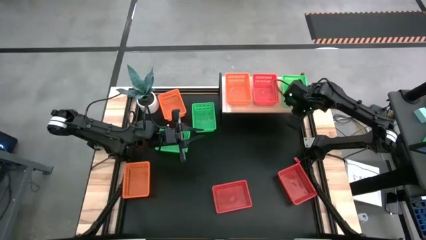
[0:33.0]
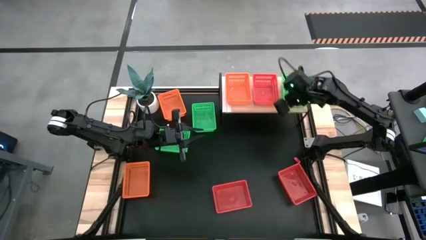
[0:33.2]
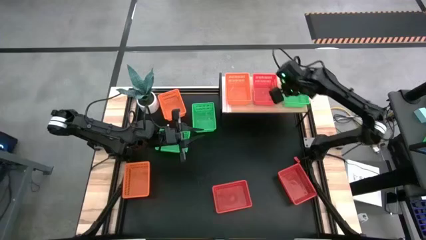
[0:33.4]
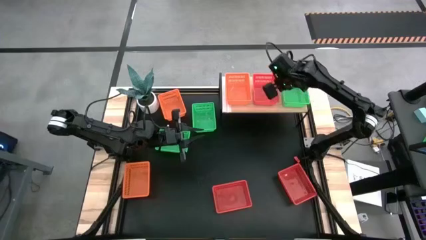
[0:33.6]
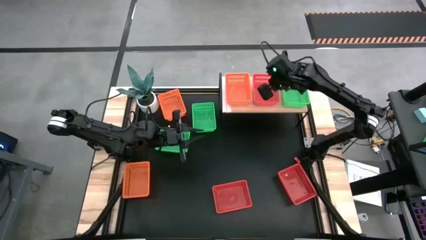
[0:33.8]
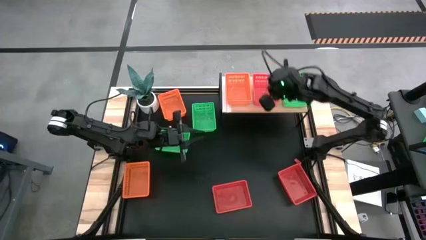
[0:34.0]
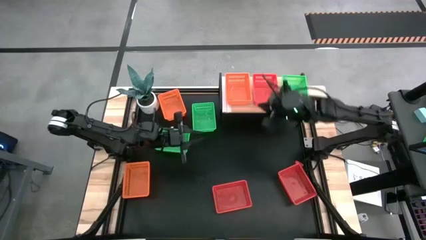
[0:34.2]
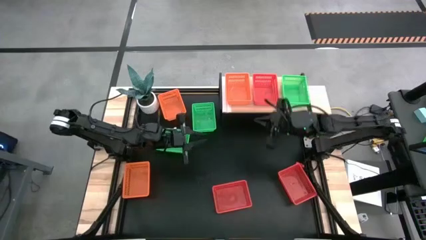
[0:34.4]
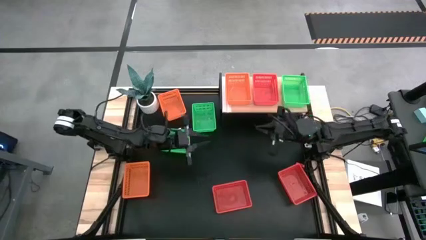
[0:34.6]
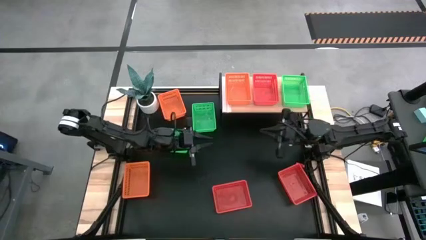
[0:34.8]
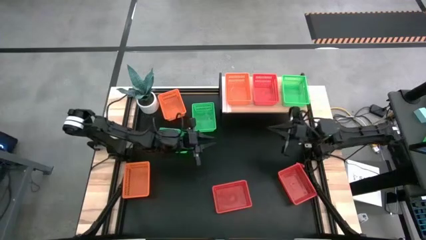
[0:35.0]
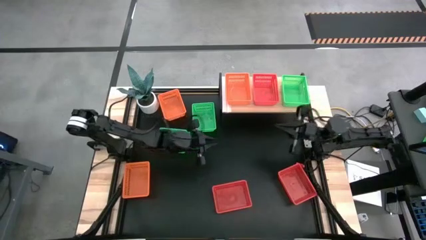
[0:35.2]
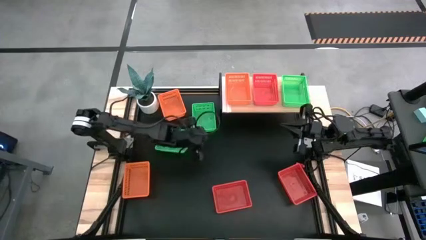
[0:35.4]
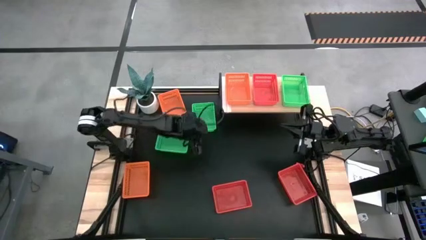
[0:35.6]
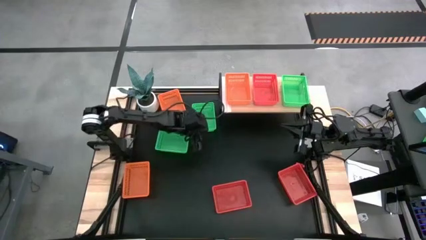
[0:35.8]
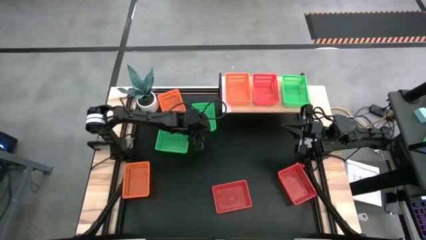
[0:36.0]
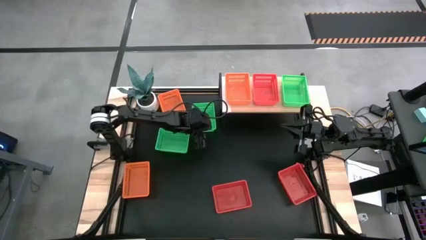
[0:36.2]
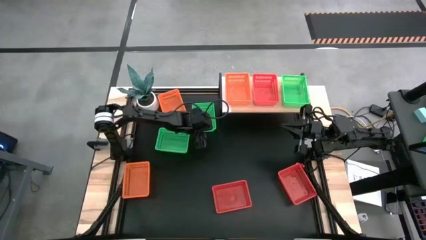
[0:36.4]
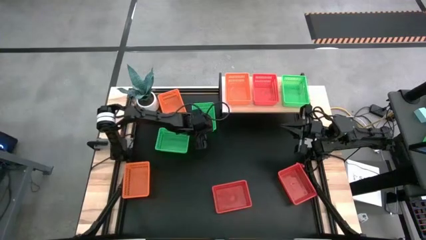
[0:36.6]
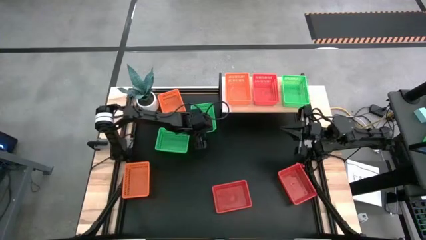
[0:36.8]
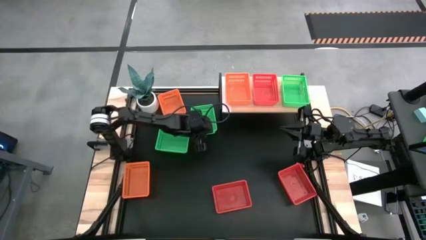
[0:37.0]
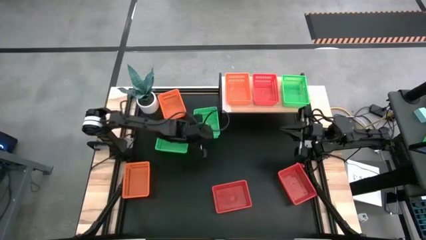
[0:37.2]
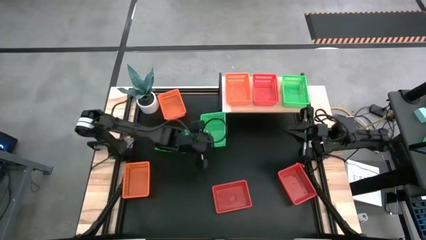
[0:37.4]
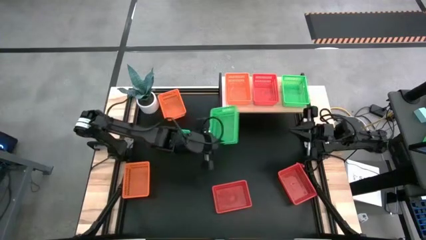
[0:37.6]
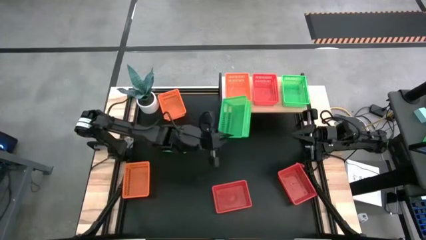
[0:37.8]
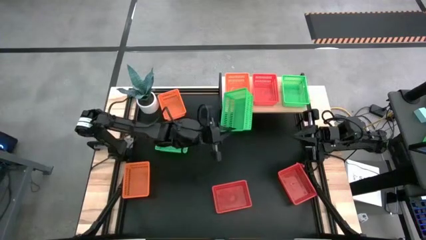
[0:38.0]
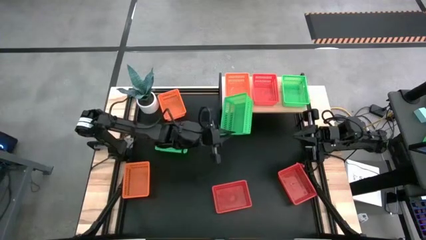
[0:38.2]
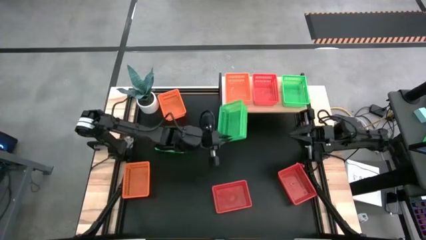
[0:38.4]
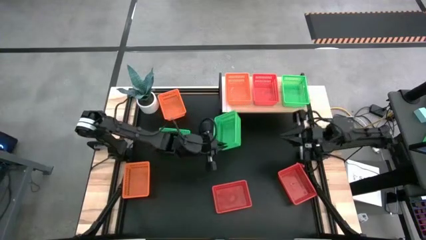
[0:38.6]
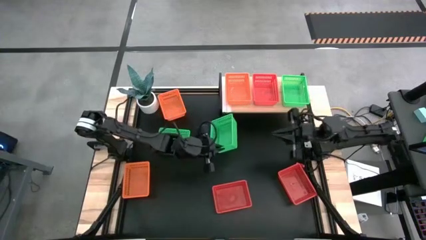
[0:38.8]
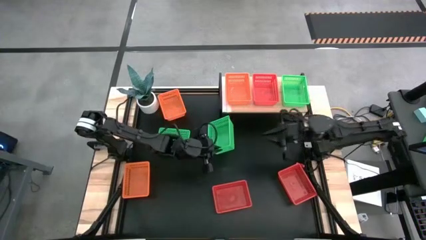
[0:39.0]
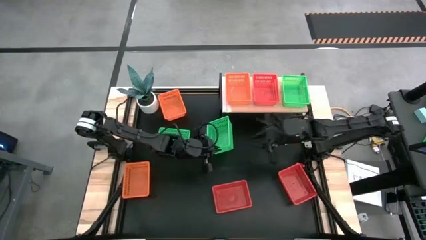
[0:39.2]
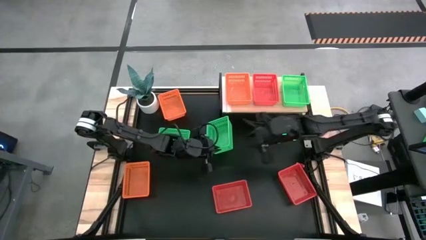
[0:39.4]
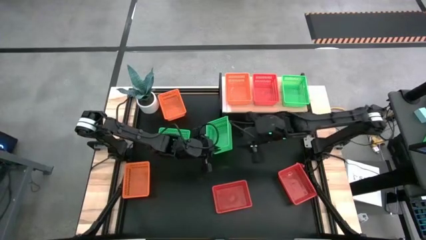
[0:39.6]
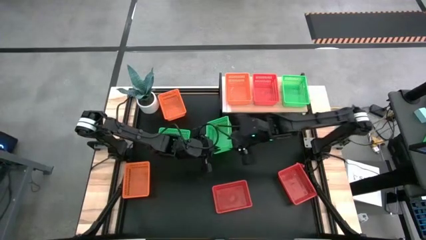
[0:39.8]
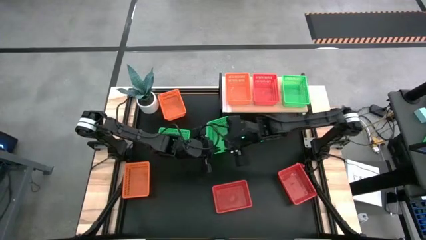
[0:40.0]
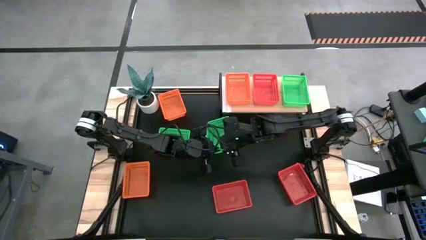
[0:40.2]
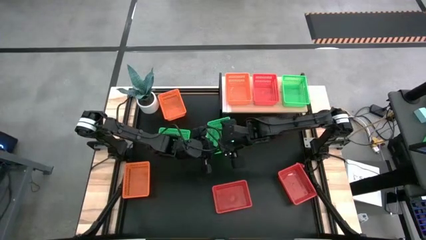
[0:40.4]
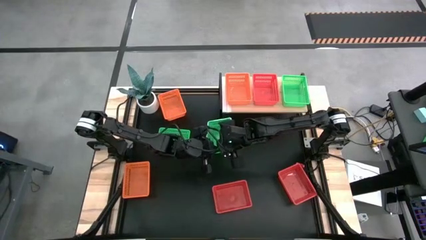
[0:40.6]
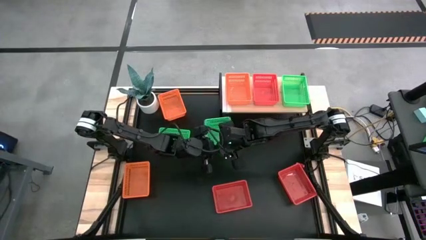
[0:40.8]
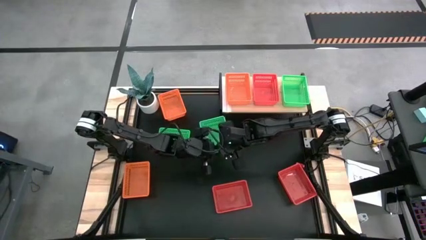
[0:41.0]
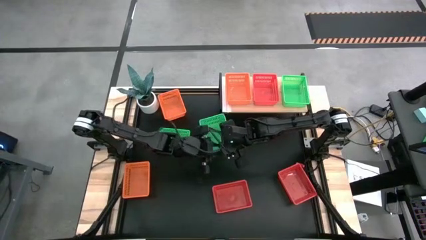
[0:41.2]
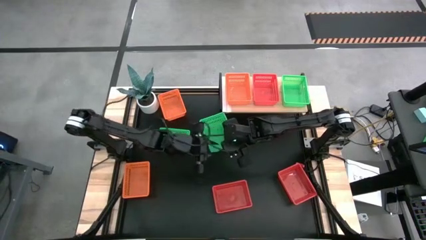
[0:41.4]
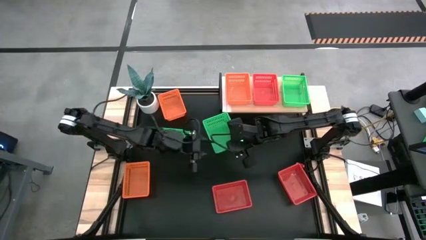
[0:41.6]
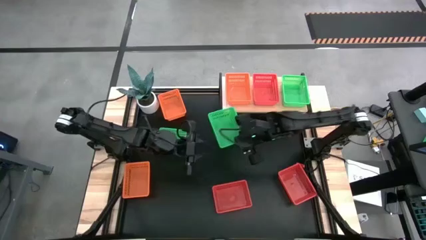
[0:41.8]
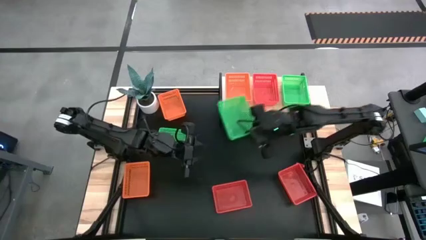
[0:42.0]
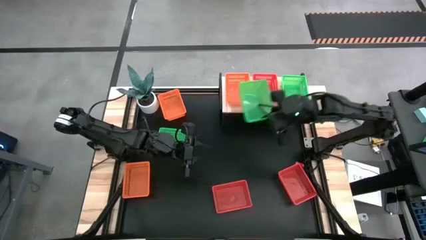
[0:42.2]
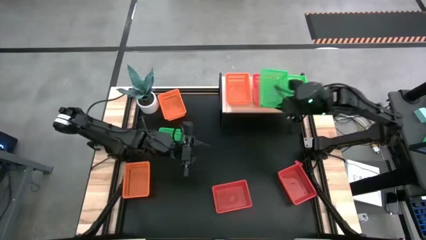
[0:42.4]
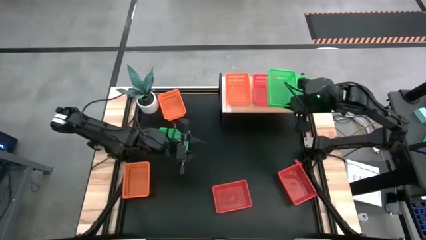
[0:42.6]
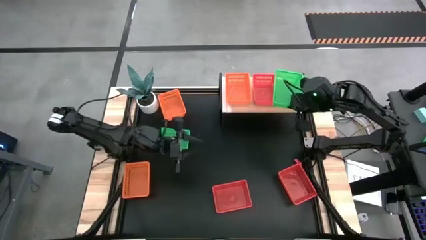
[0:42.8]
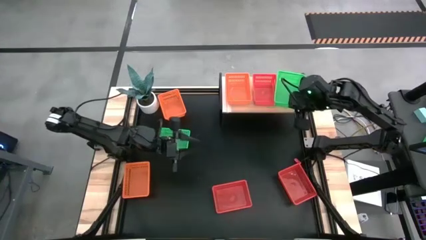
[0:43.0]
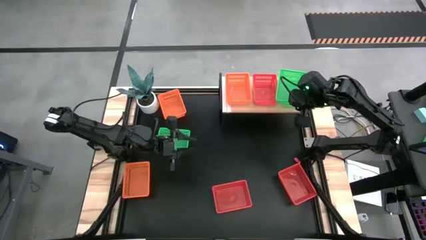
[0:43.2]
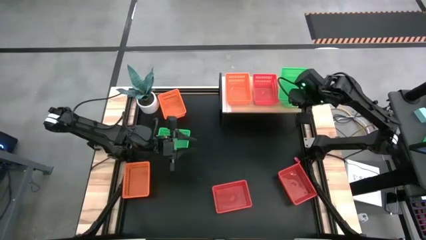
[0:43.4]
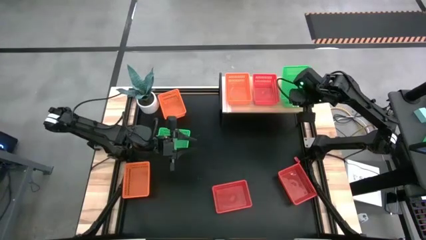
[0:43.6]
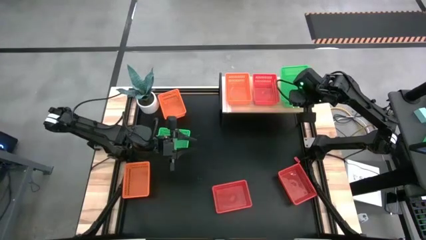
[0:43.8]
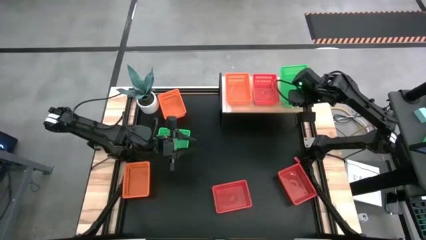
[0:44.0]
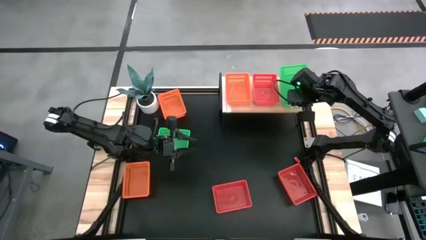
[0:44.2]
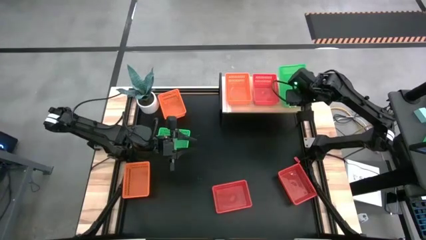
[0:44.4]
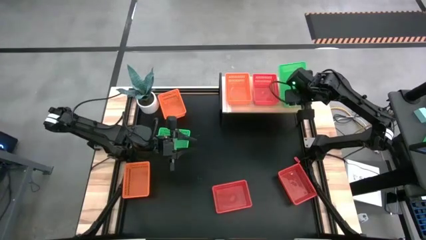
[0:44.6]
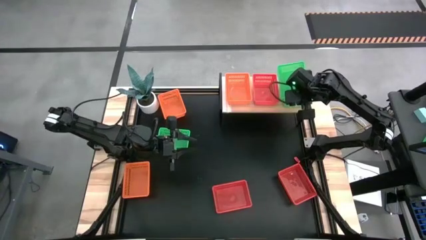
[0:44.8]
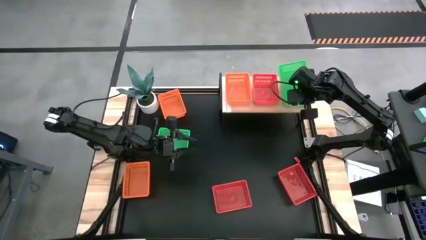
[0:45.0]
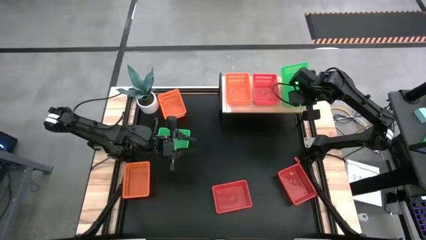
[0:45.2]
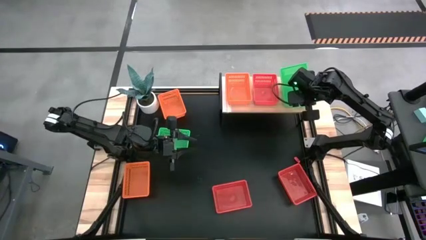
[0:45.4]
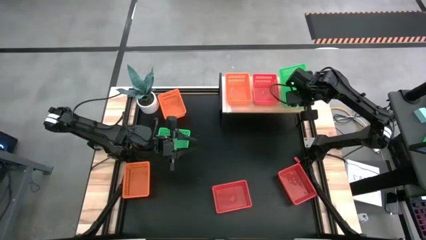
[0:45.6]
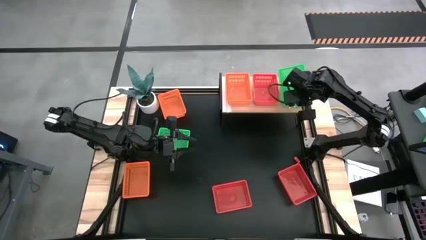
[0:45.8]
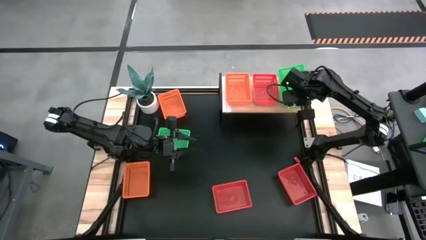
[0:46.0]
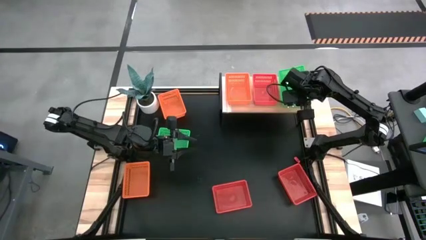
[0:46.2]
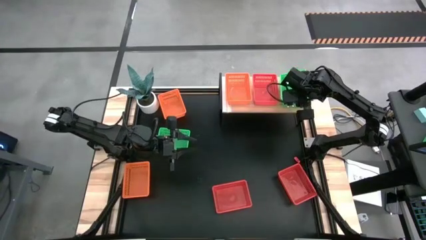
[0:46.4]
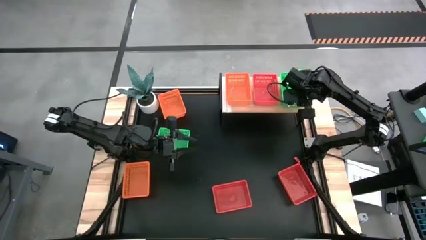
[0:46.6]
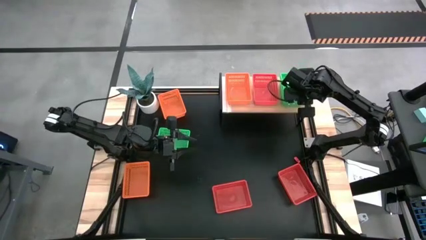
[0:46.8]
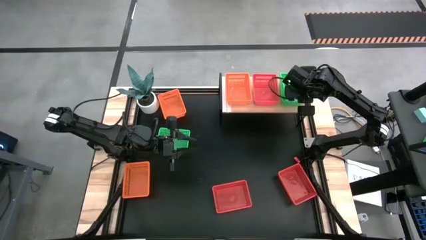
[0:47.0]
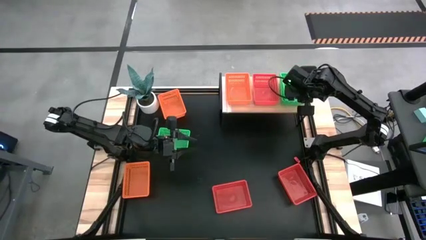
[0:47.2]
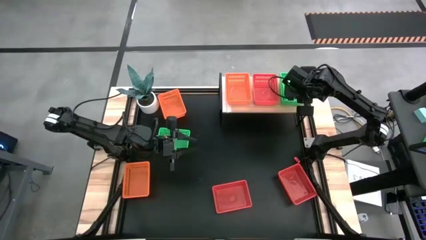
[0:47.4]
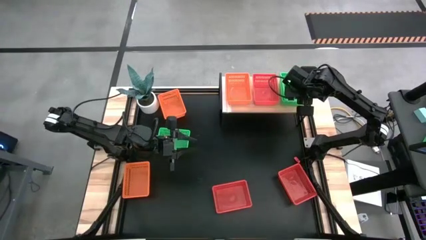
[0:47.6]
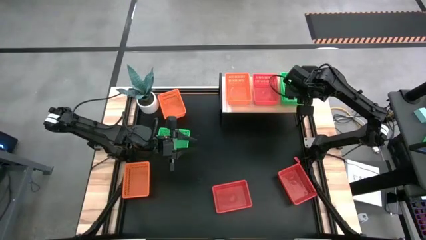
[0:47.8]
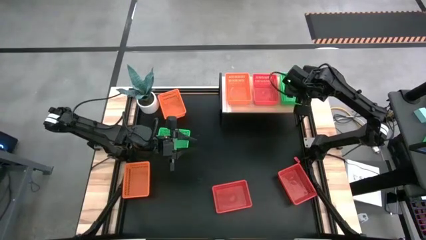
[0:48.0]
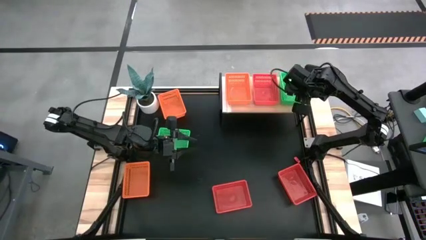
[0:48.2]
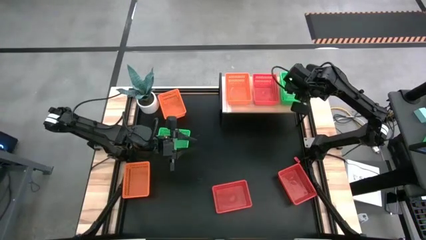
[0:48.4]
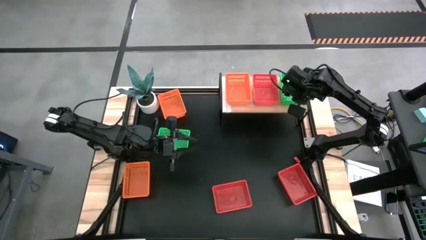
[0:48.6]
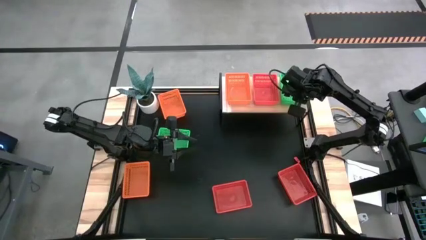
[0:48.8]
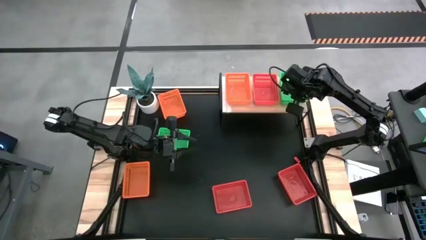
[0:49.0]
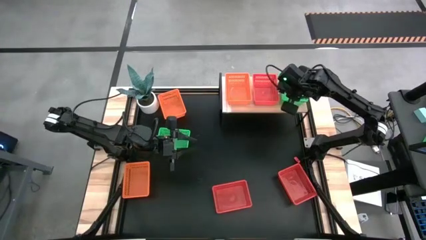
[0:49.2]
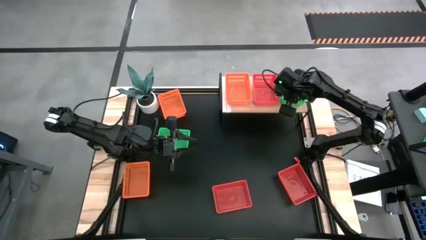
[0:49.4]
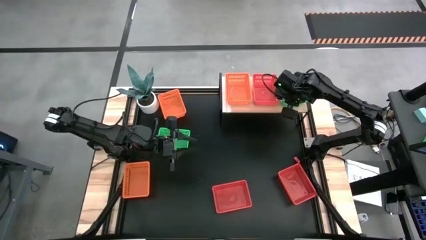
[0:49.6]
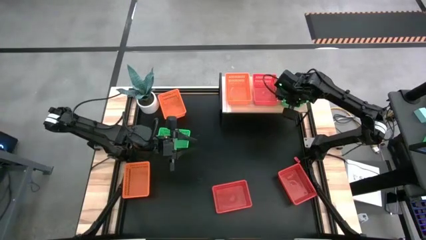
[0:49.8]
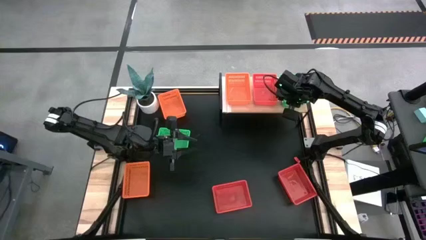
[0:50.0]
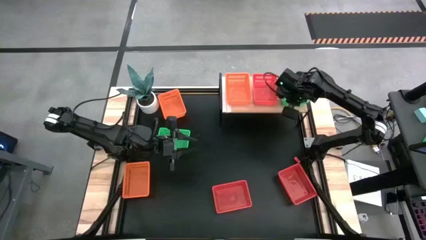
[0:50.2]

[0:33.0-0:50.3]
Task: Stack baskets on shelf by color
Stack the top green bin on the other green bin on the shelf
